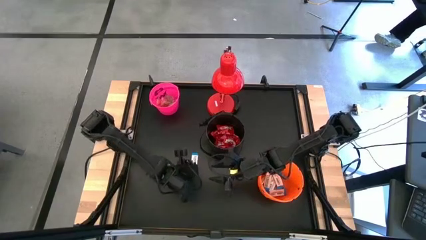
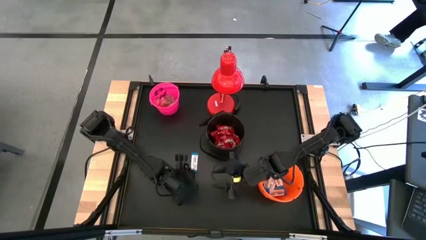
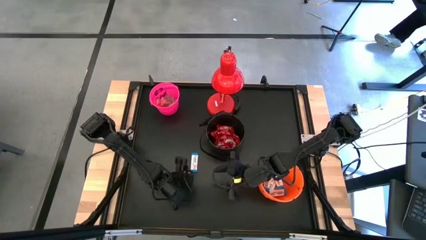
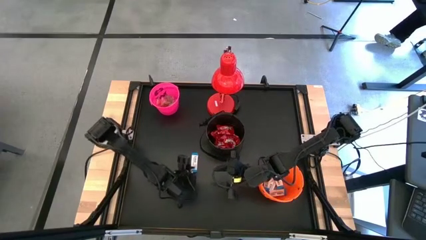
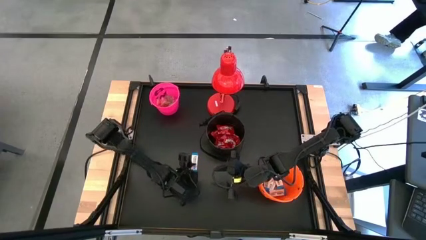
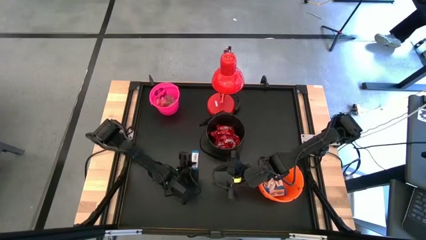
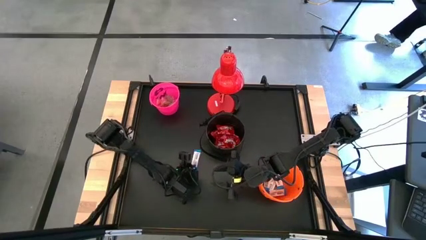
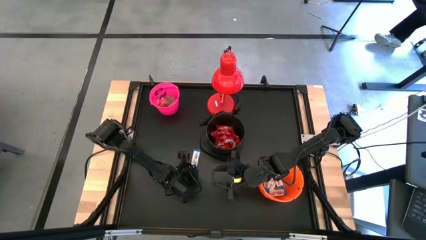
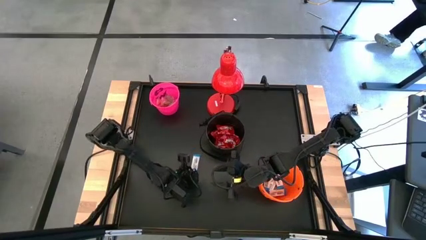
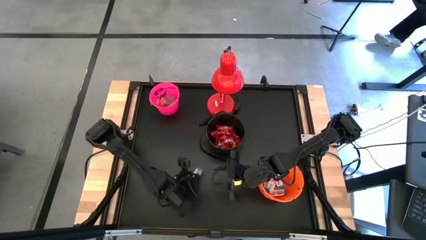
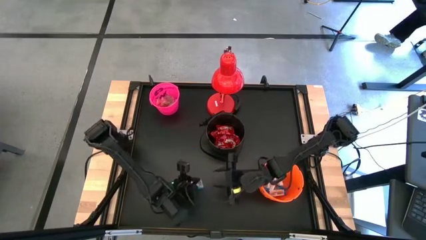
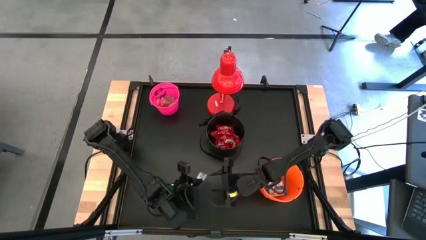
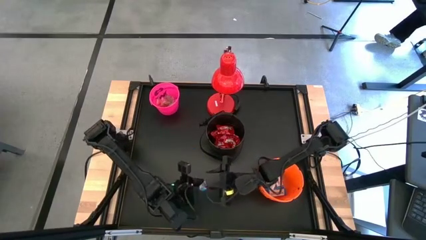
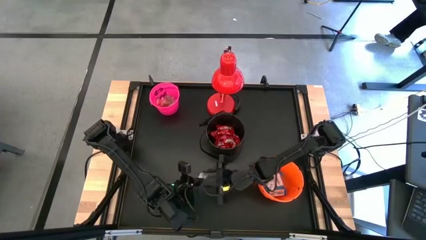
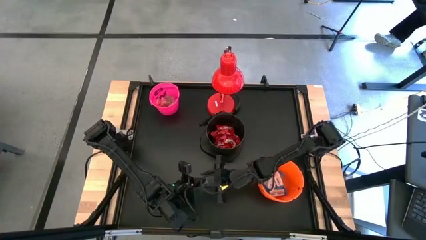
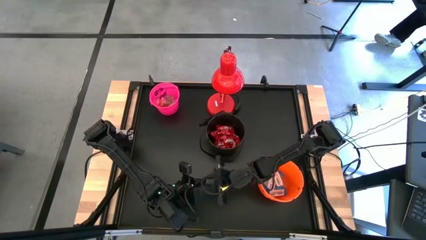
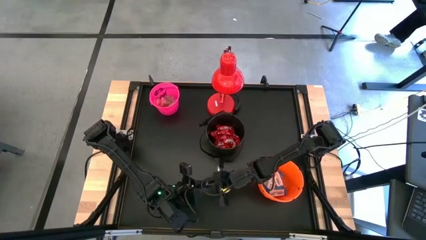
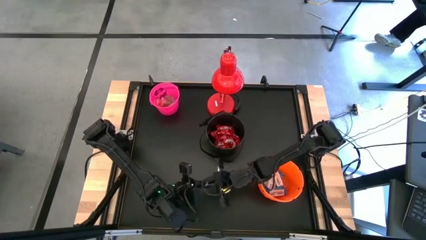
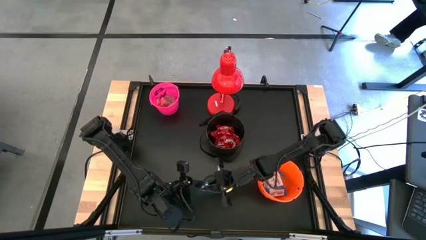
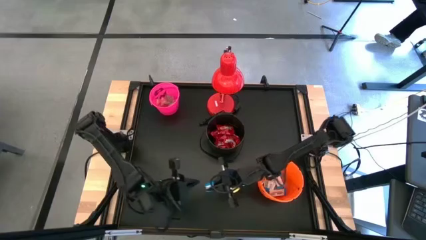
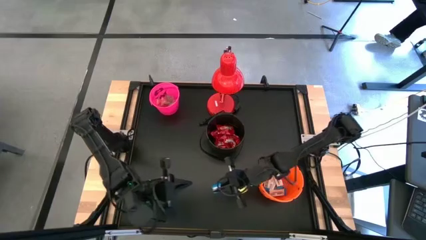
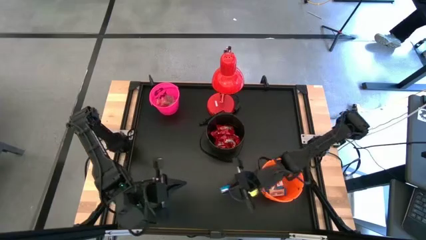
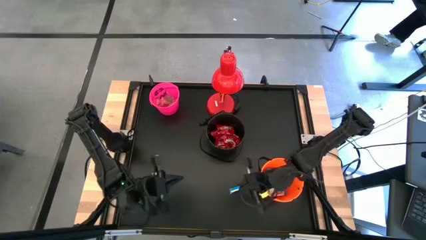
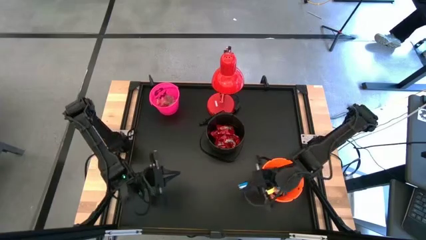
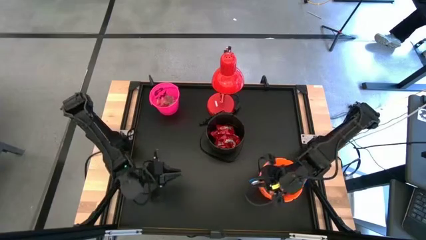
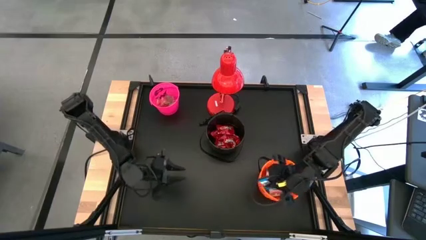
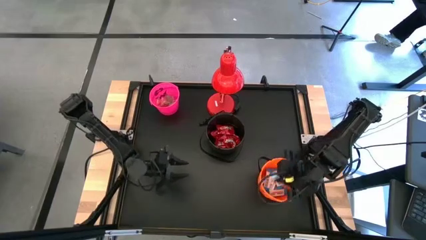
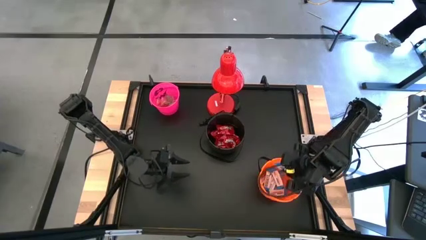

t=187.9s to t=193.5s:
Task: Organize candy in baskets
Put the white chocolate into the orange bucket

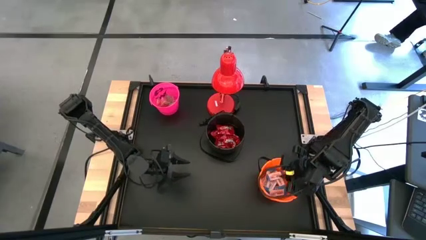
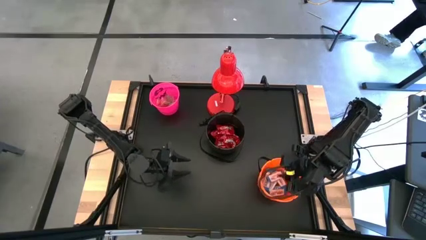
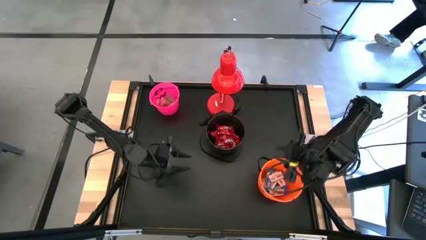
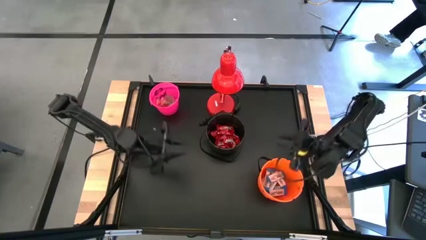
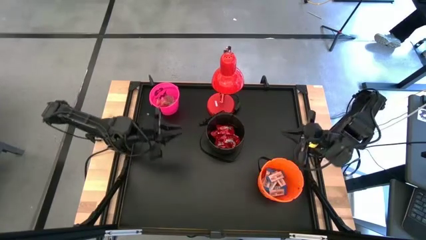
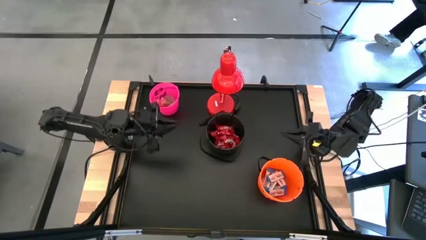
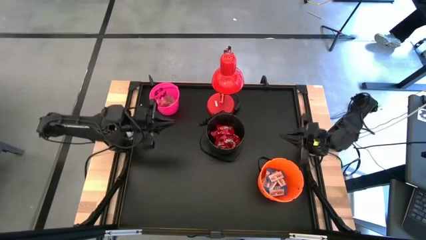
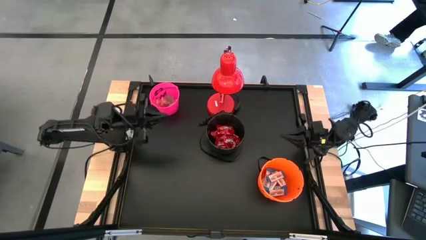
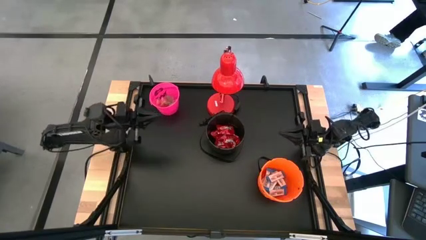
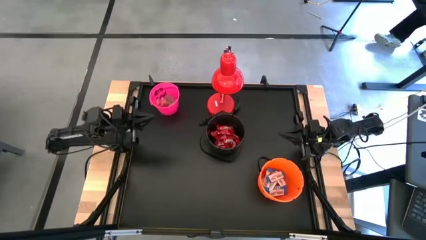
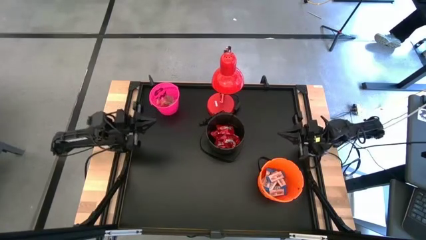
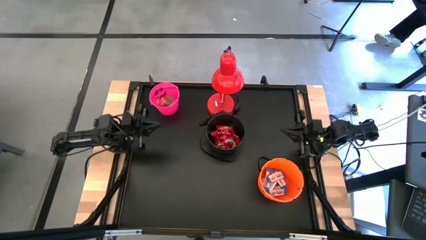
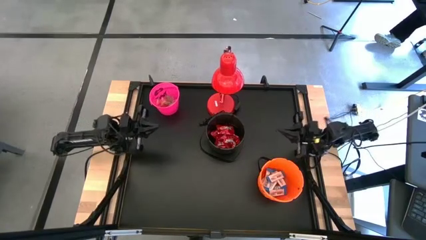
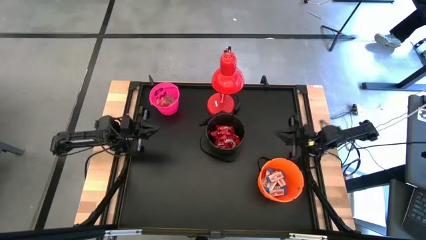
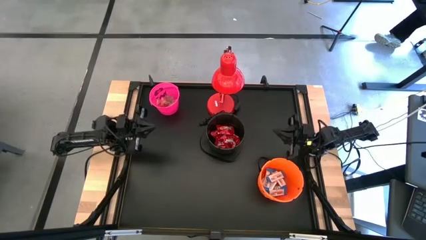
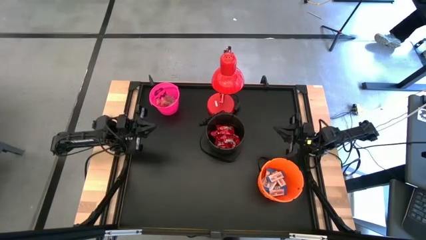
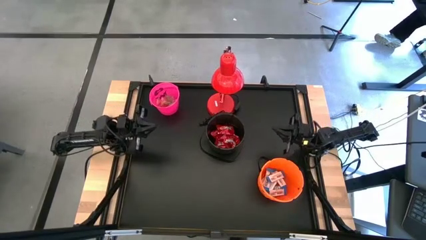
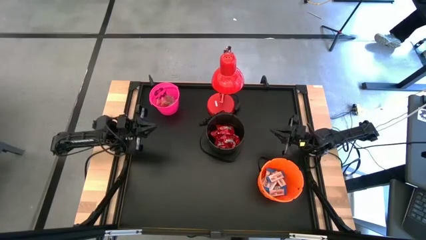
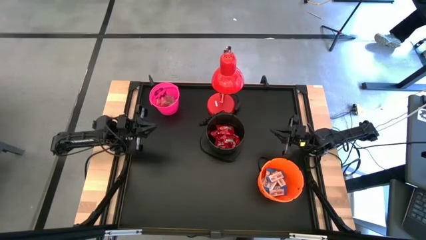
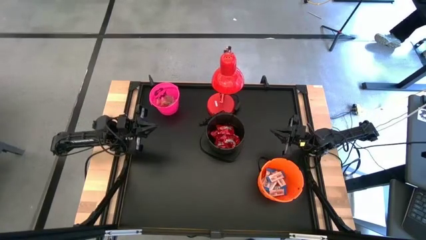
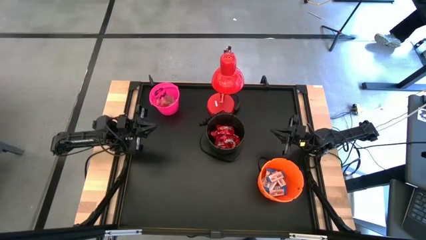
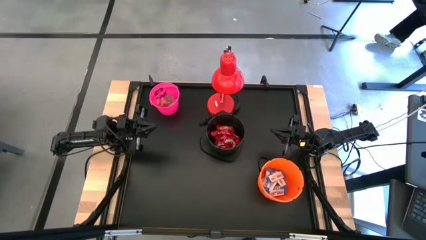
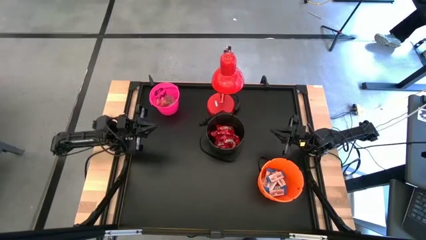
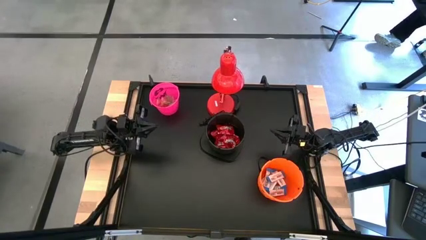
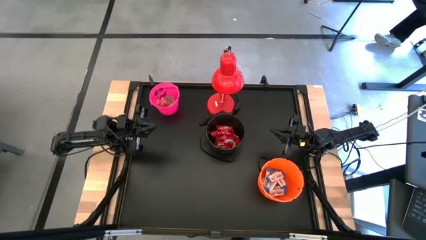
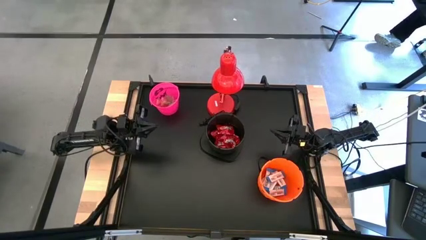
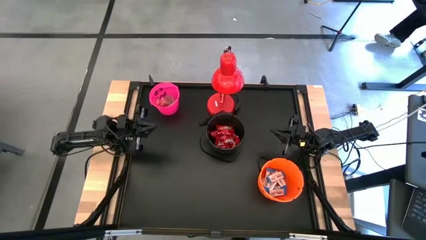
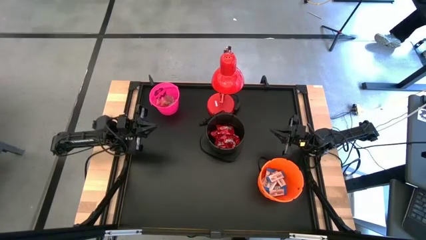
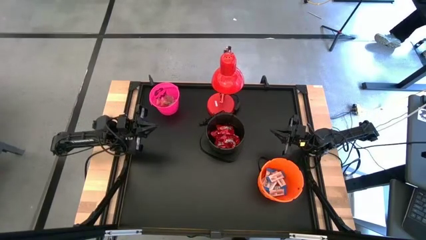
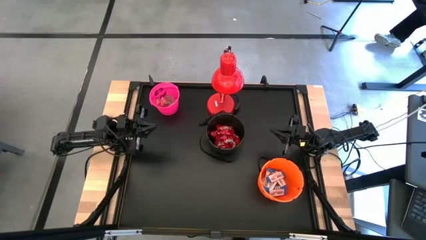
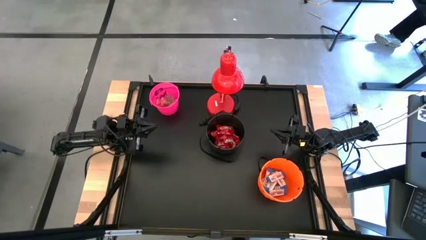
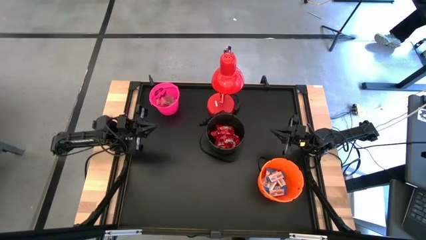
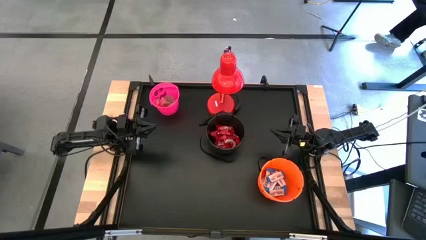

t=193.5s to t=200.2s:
Return to Home Position
